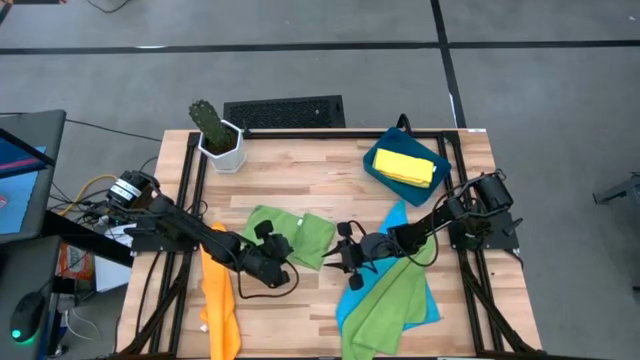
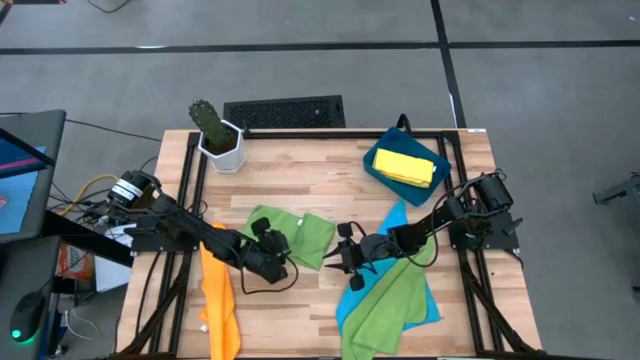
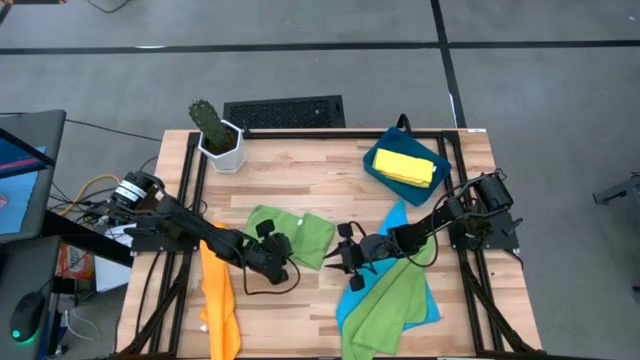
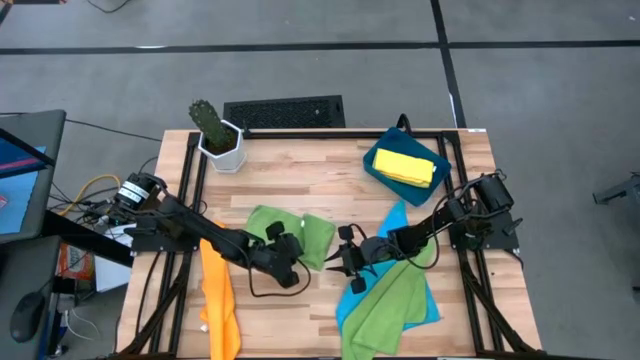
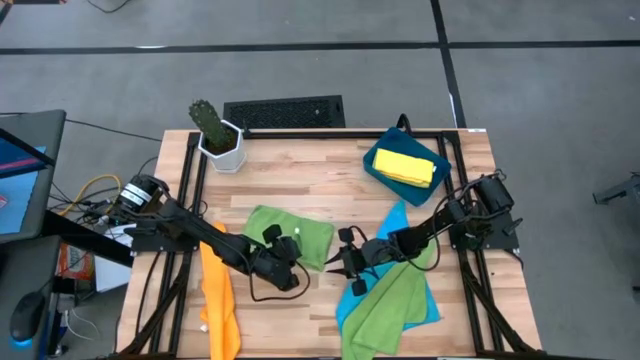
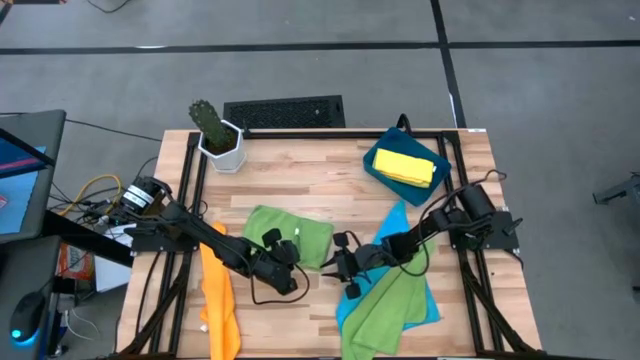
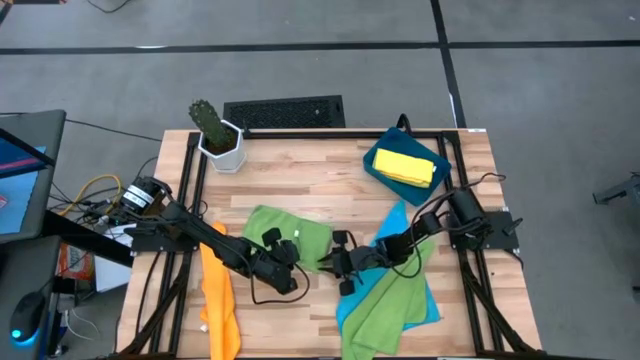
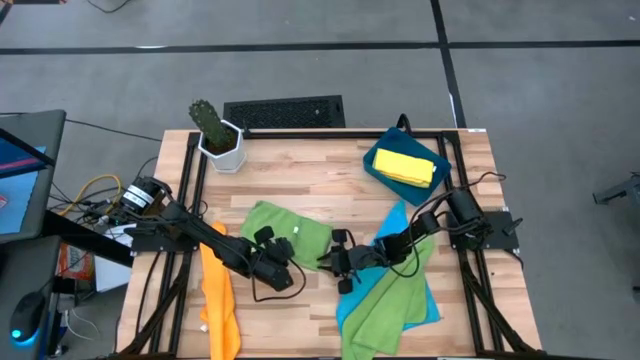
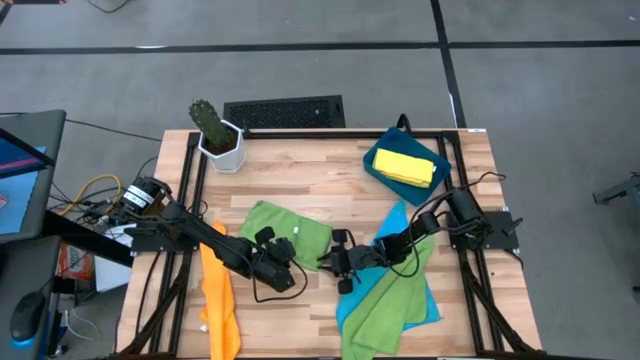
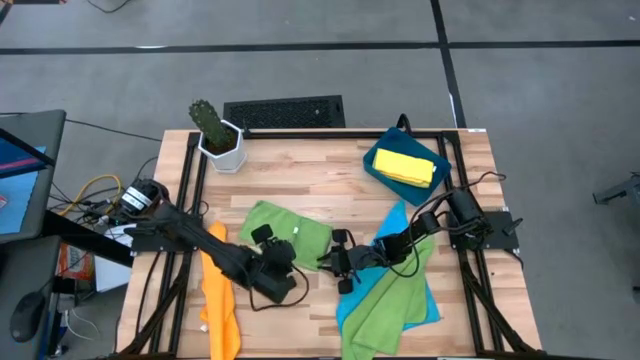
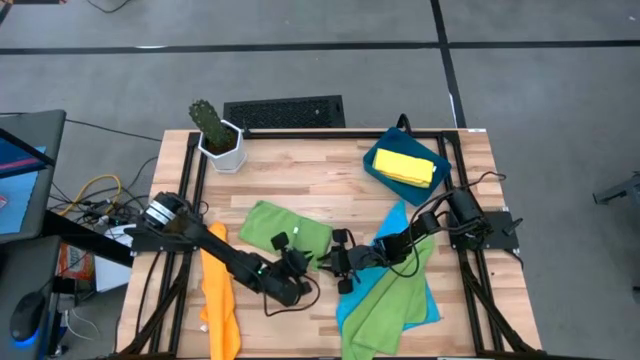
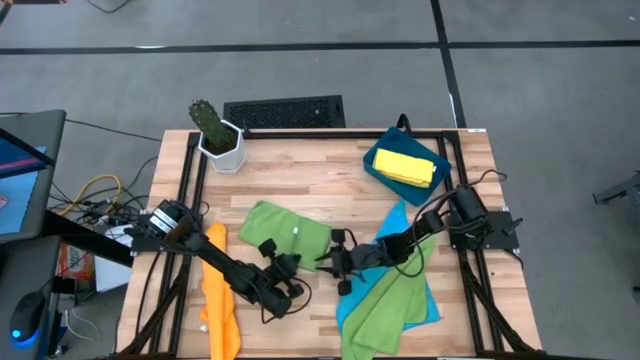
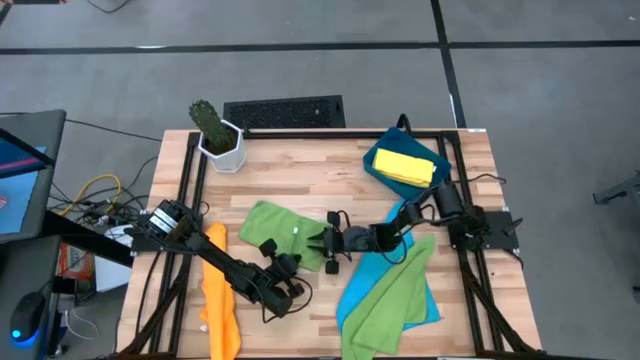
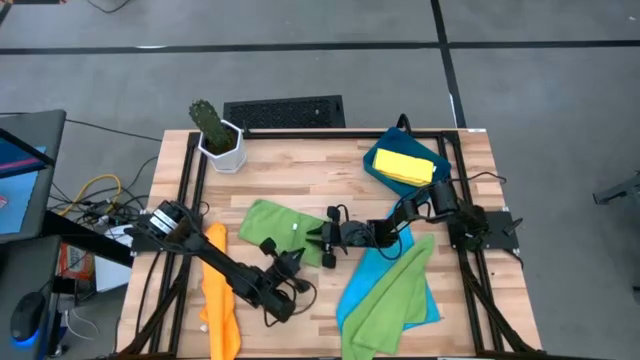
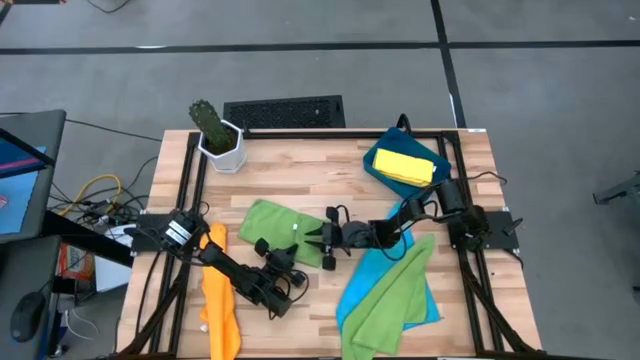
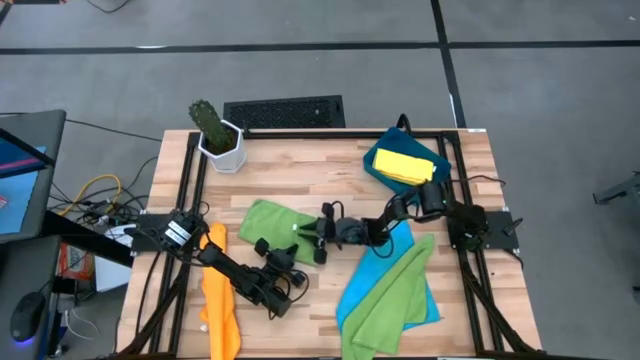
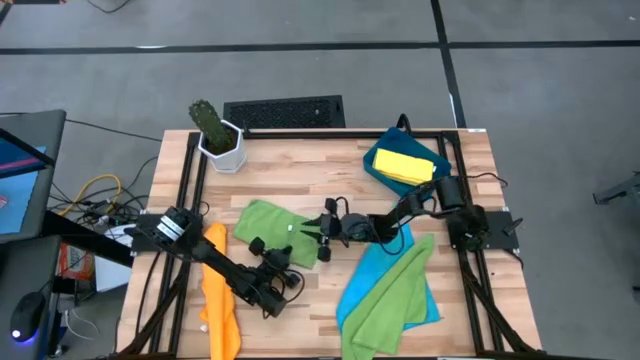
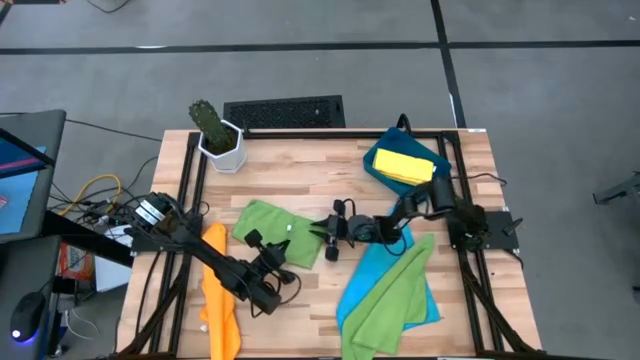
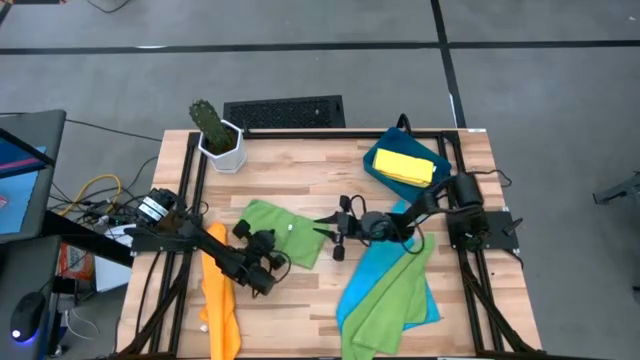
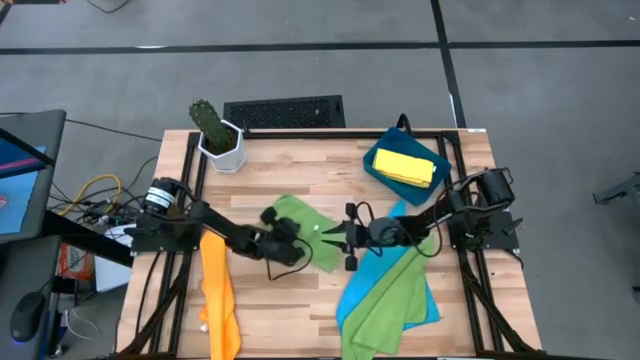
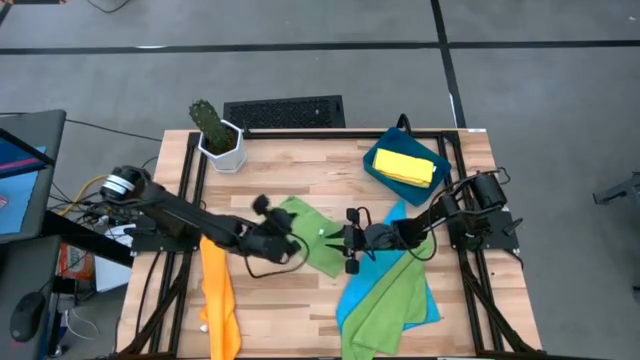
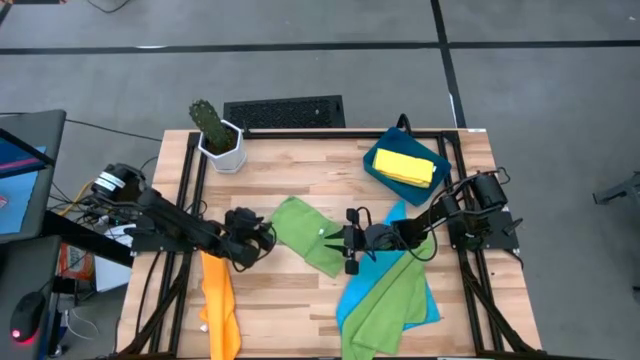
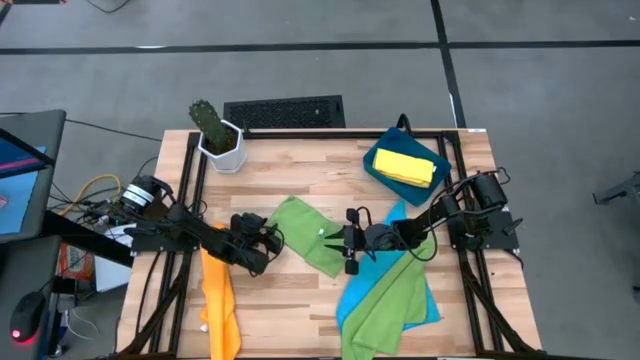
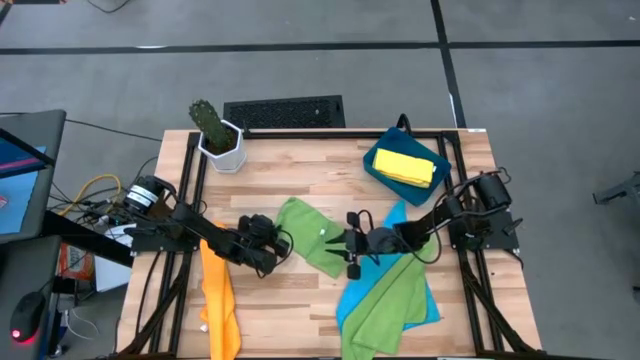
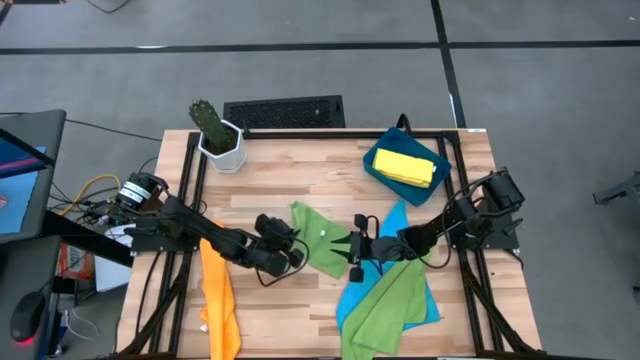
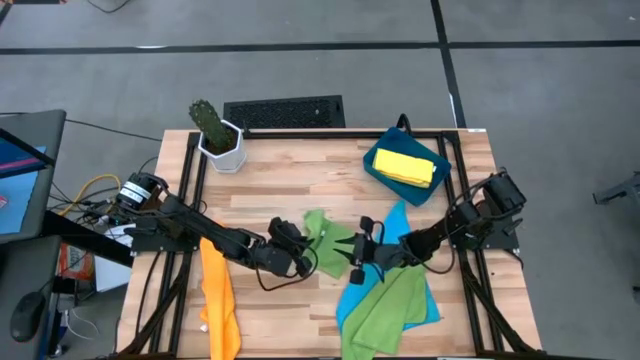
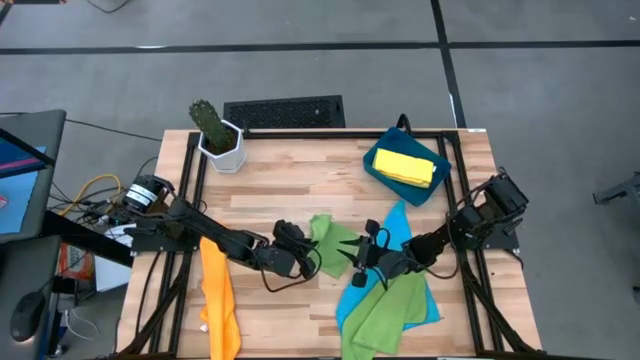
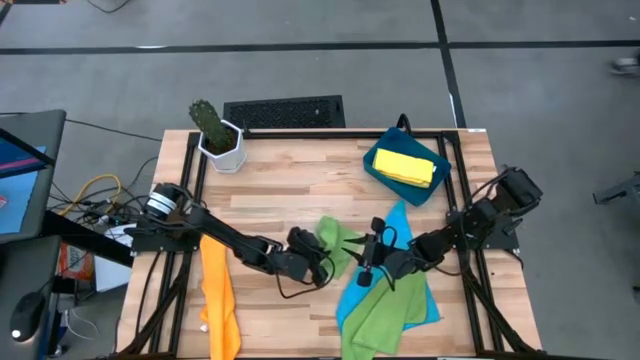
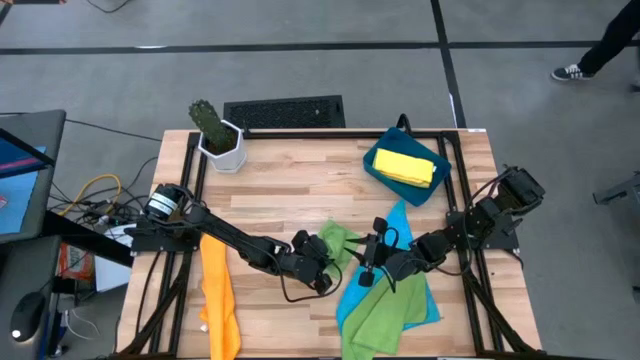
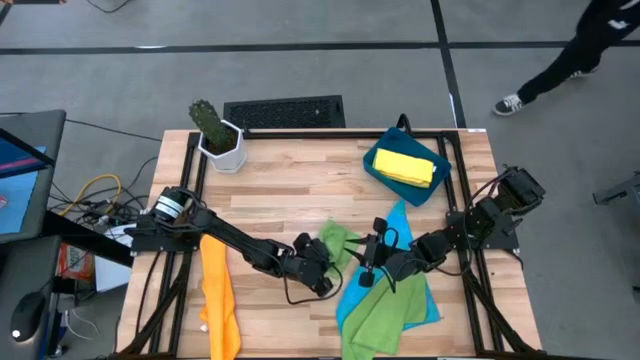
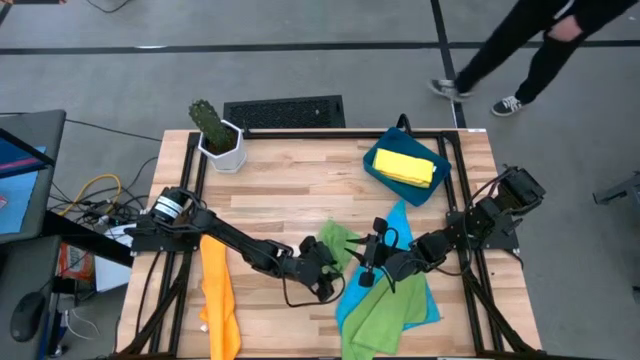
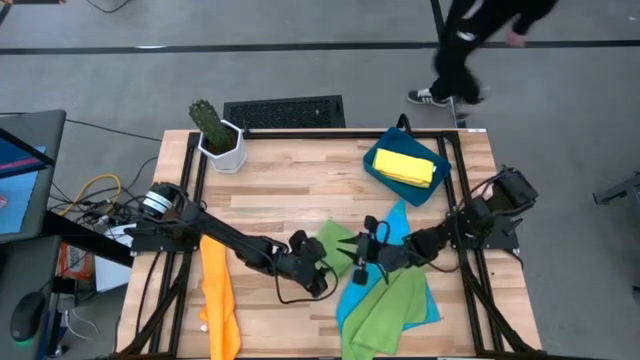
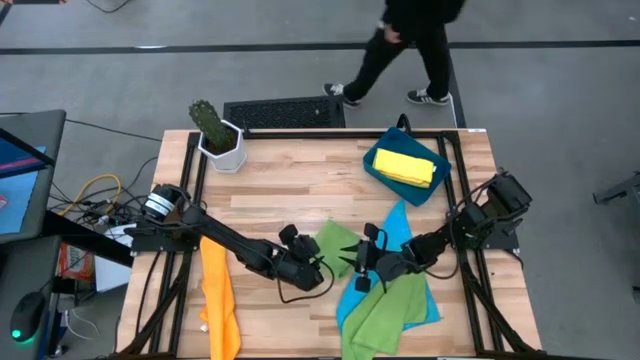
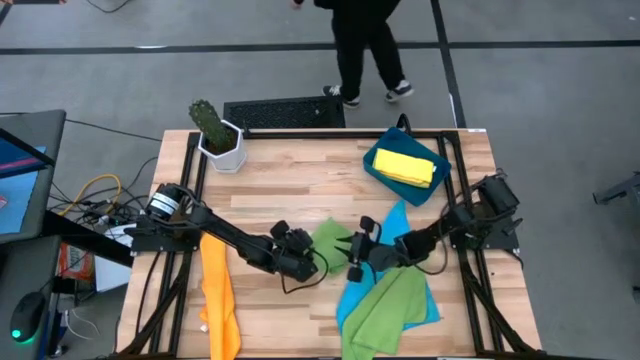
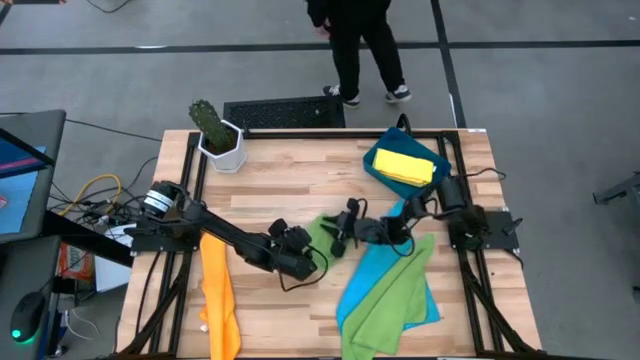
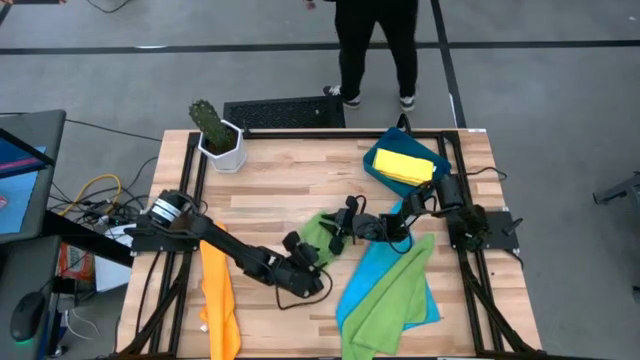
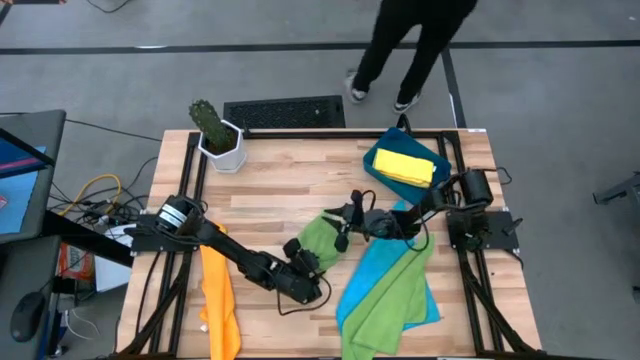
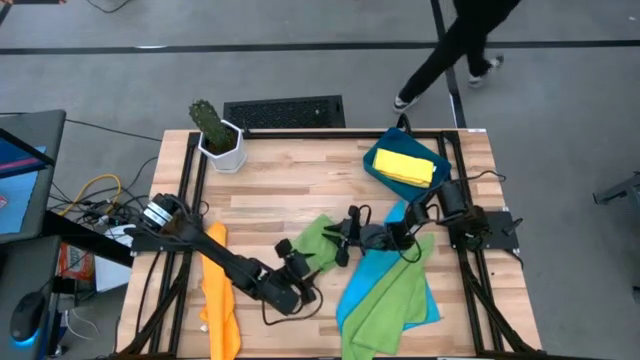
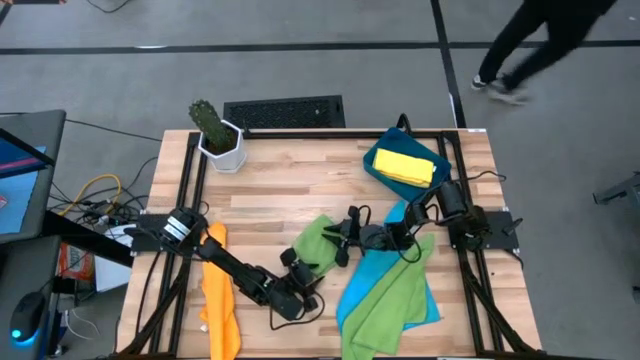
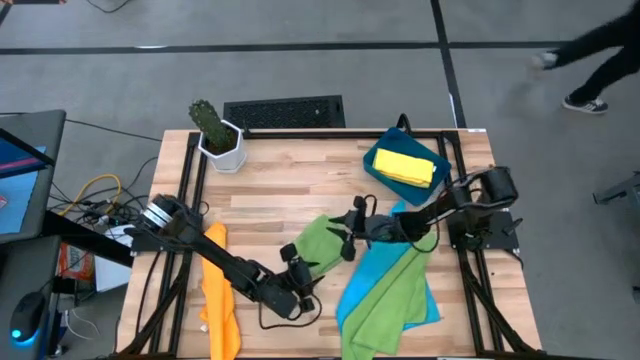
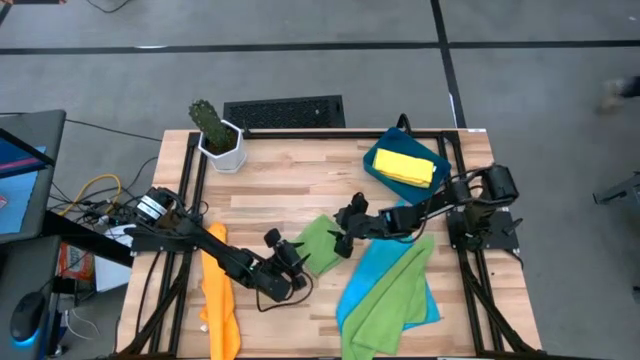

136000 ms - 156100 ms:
Task: Fold microfiber towels
Fold the left green microfiber cloth

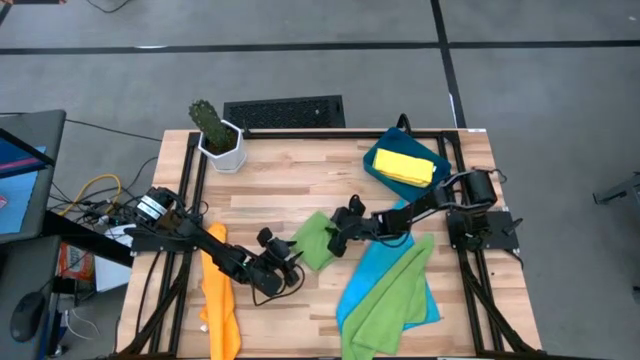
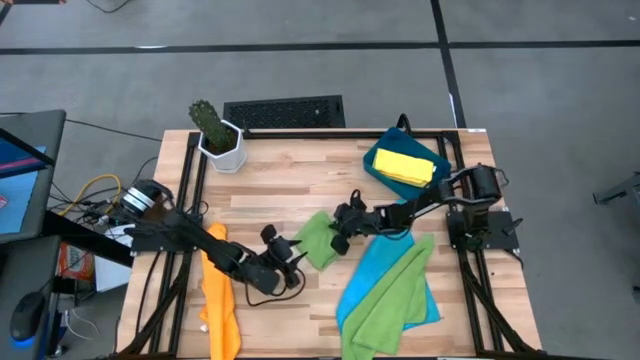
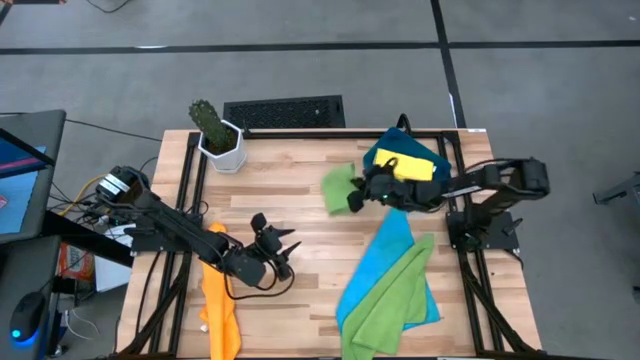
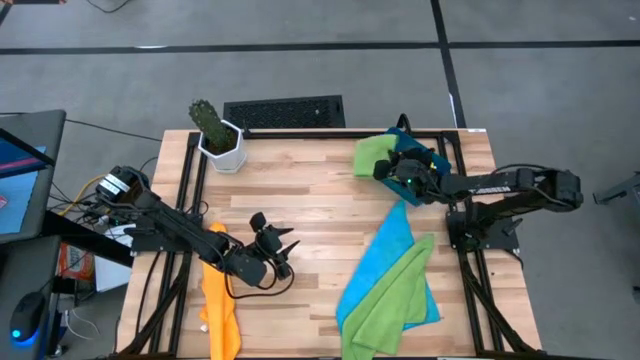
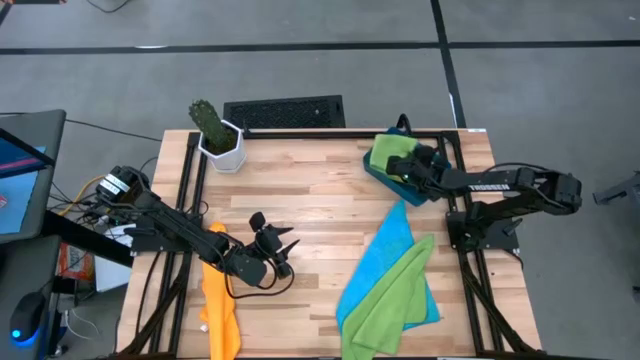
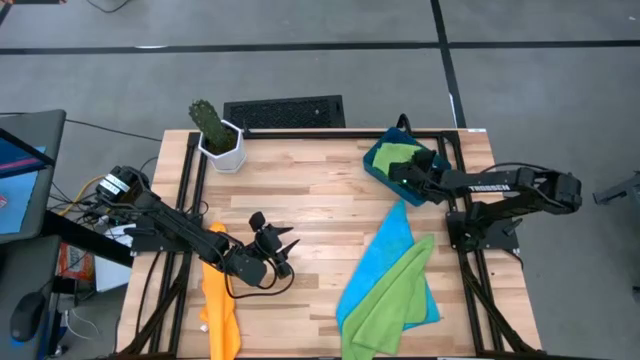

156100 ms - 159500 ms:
Put the left green microfiber cloth into the blue bin
